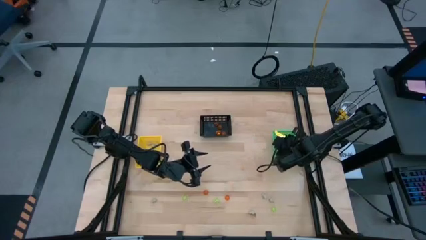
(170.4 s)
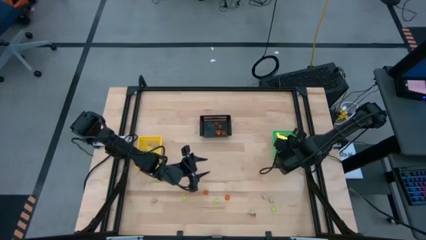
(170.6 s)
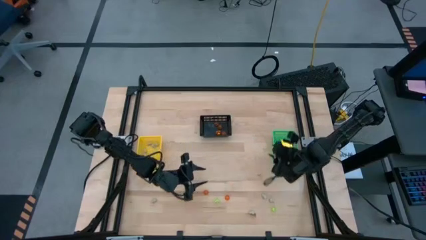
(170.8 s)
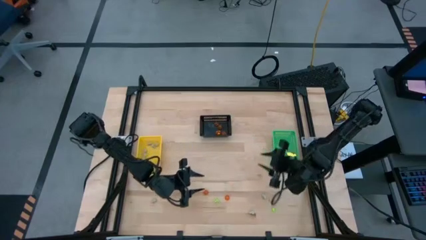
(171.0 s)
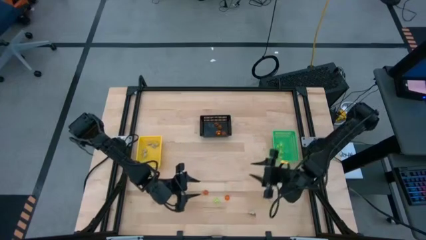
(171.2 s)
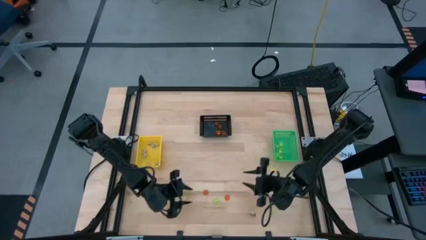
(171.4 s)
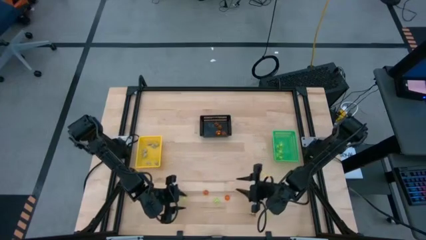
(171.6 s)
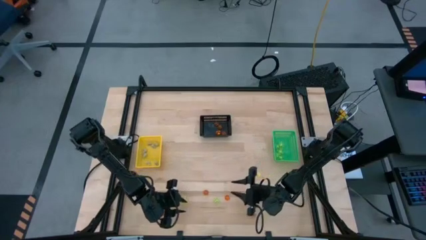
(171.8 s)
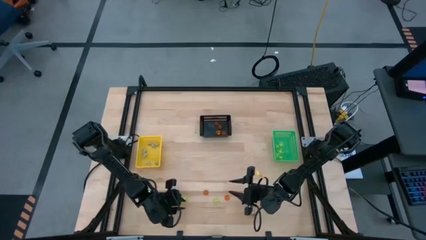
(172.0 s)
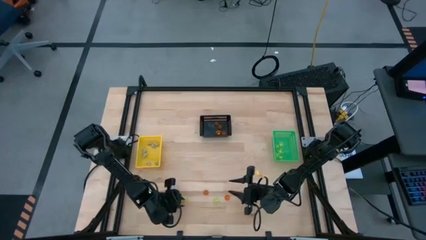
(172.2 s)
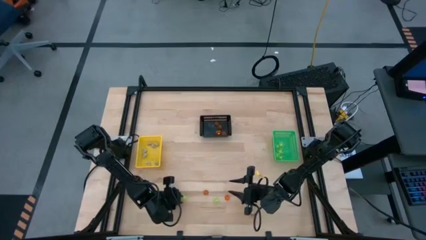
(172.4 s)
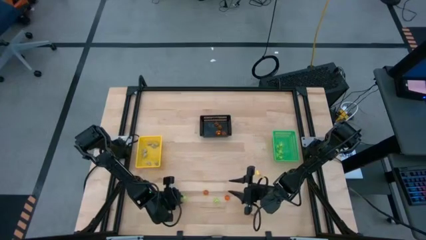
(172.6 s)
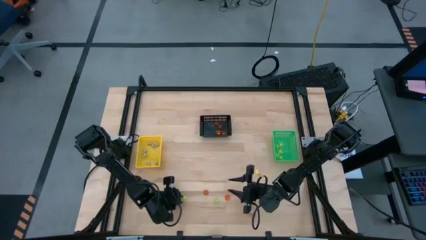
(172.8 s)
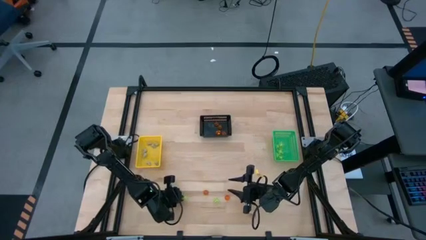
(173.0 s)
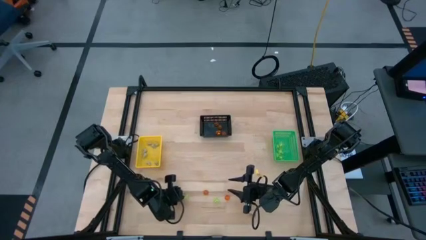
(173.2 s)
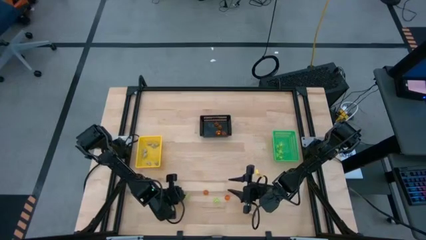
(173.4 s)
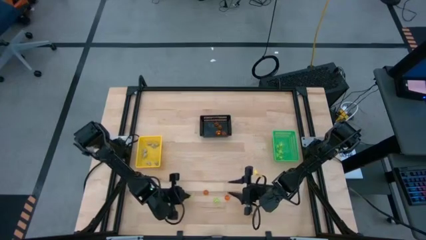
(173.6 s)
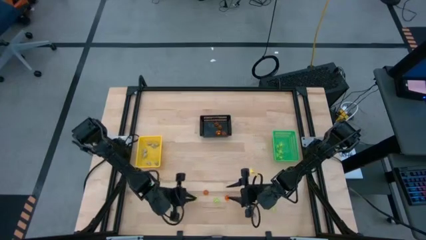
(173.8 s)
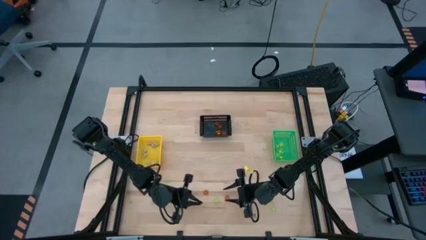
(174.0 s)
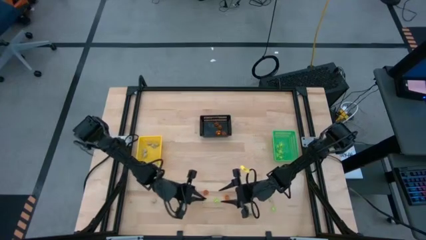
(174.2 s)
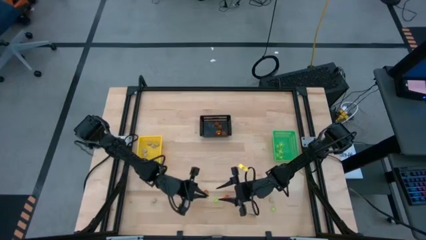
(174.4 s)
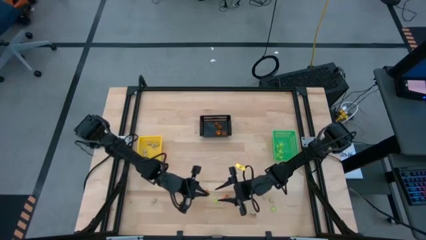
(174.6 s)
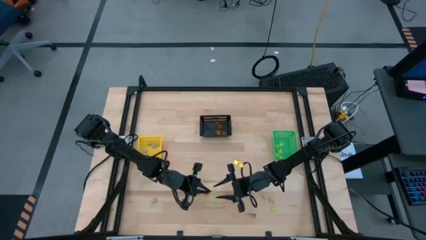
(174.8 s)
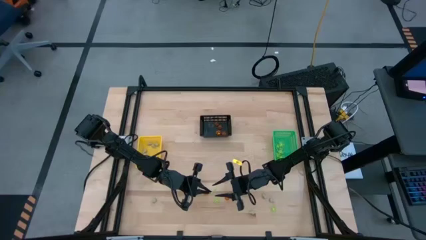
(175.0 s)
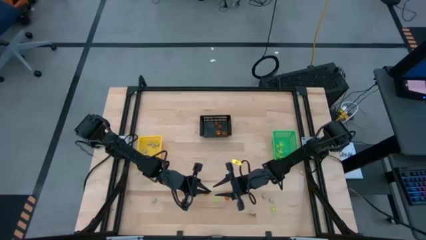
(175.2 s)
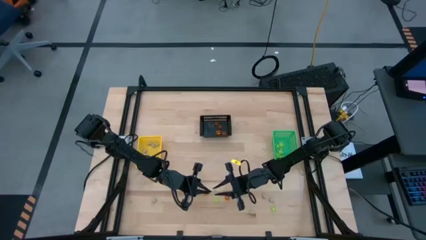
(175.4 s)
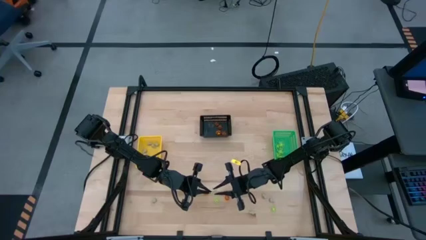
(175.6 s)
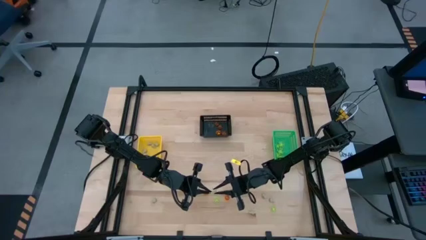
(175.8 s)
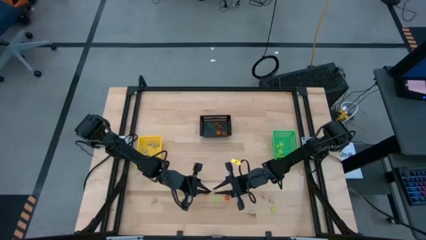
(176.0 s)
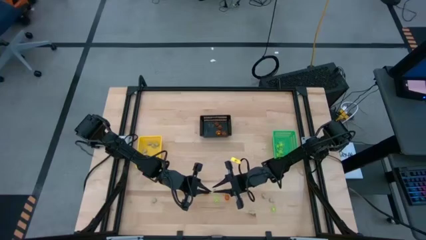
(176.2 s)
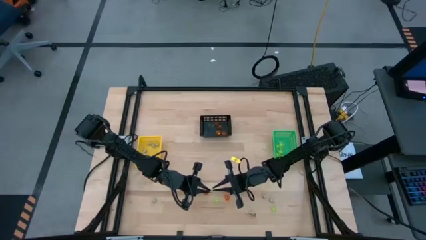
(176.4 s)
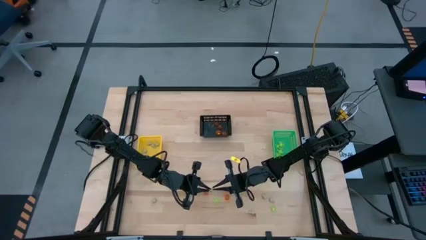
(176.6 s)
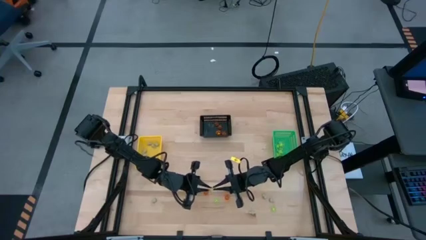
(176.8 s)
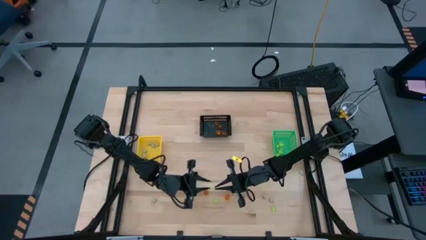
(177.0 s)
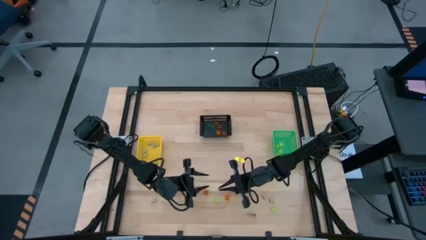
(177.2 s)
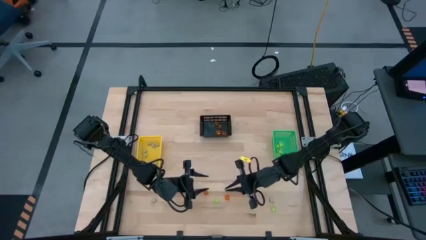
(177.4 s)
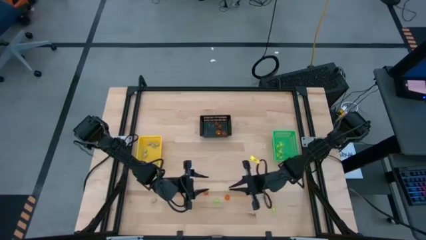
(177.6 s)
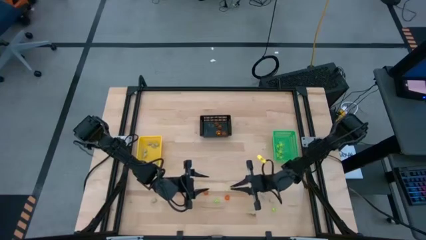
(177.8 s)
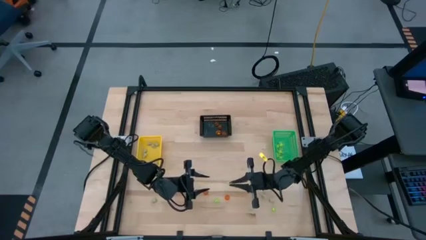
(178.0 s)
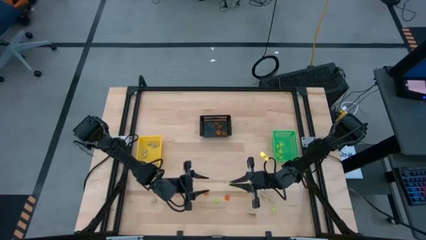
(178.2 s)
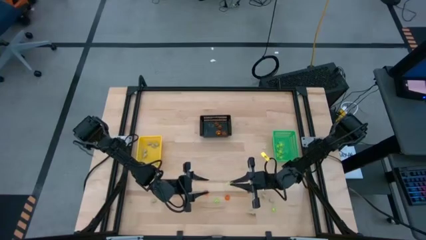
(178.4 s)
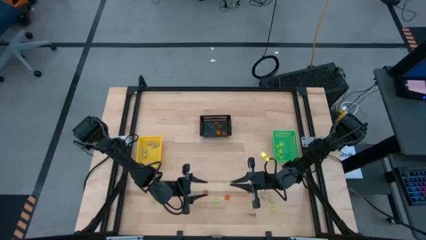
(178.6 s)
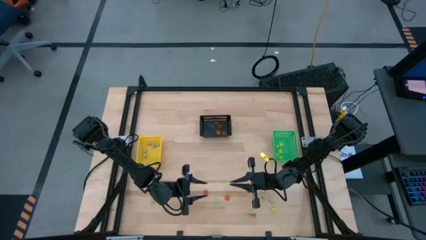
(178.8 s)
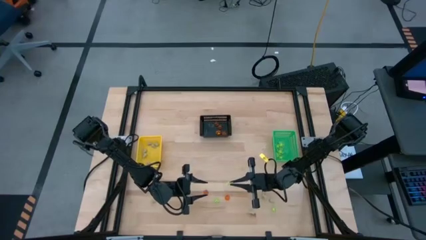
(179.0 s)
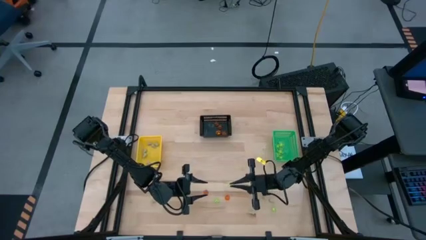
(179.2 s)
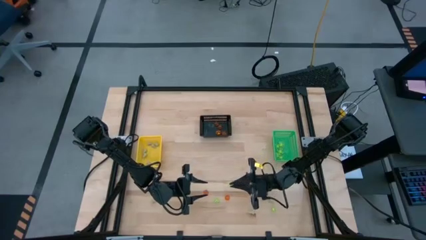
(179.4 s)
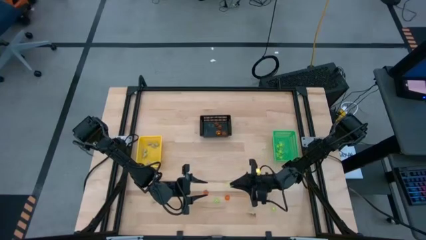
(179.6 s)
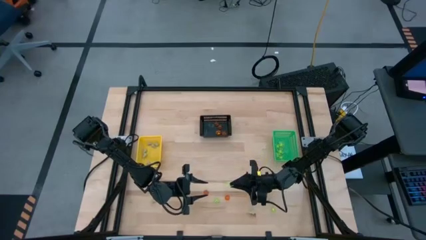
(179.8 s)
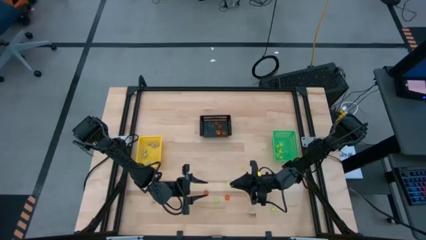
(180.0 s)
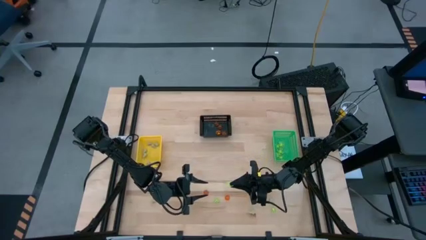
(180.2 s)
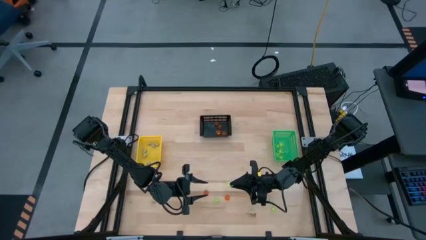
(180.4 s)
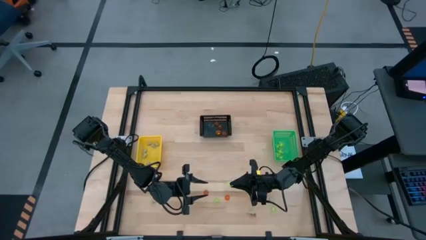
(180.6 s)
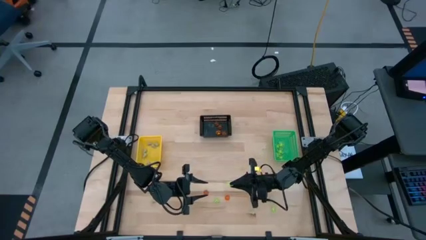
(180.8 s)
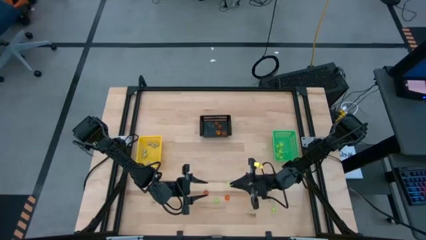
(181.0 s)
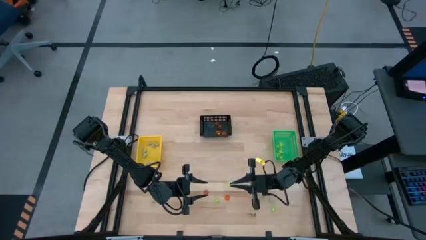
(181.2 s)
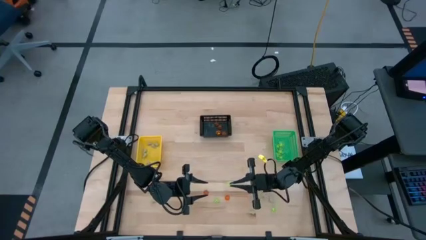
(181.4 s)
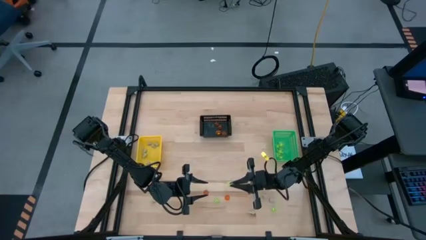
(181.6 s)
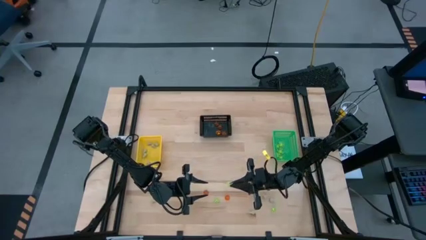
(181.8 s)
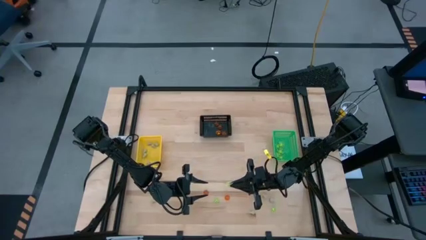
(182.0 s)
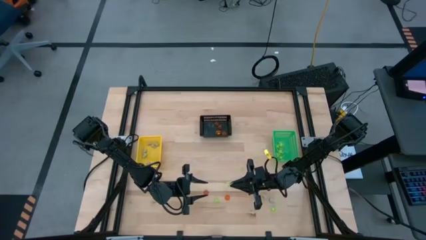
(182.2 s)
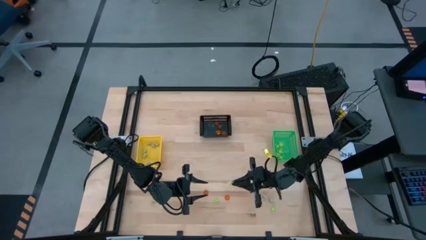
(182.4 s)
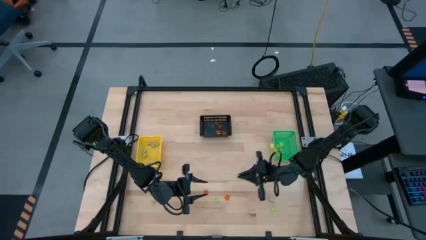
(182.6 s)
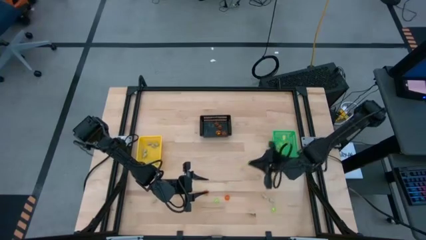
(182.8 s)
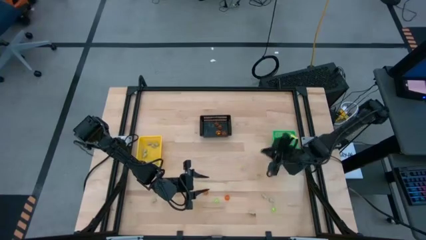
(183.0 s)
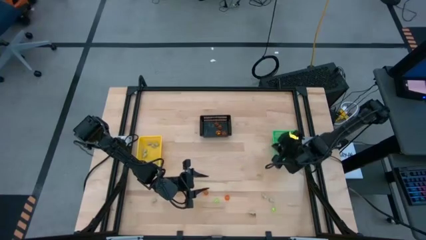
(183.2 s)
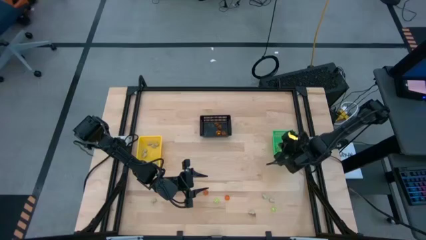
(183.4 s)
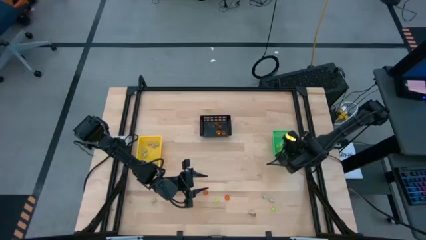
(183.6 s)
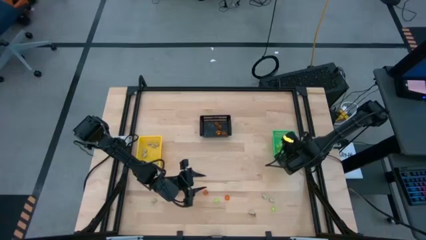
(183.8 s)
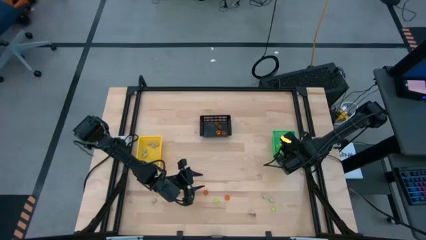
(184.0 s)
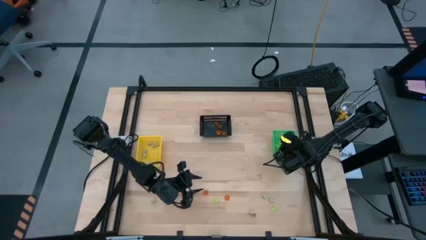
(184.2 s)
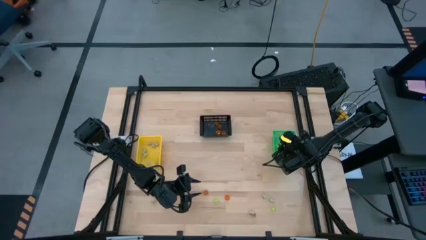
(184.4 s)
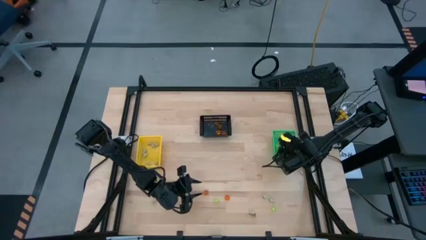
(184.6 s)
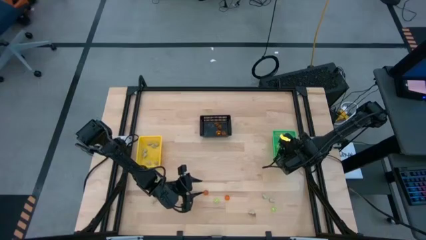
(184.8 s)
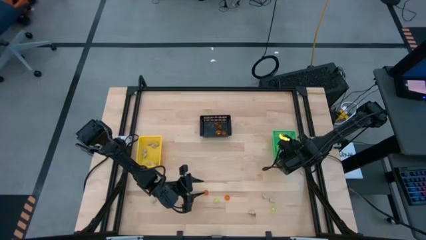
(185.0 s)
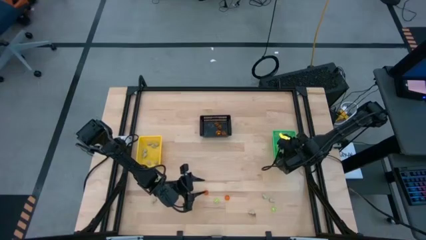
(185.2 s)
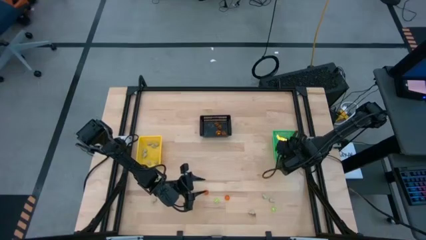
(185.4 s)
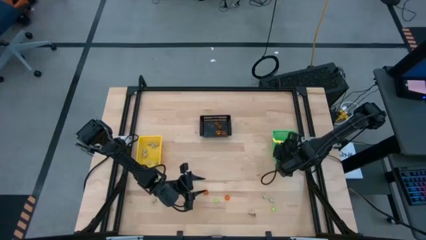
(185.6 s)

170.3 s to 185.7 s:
Task: Sort Halloween decoration
Put the green spider toy into the green bin
